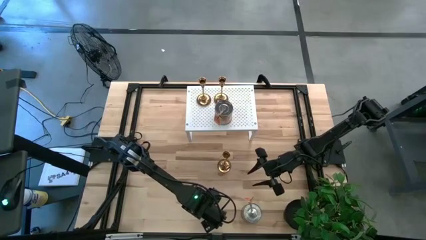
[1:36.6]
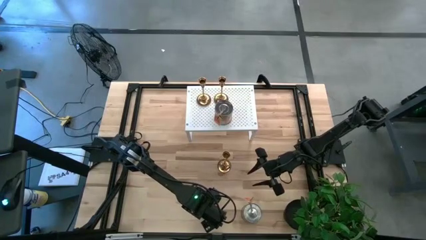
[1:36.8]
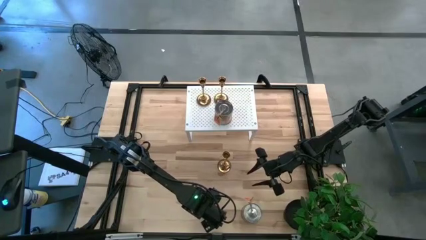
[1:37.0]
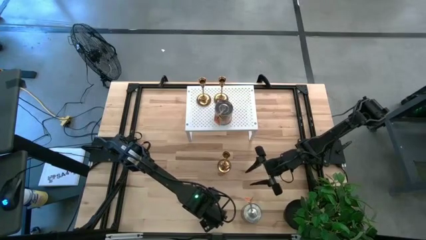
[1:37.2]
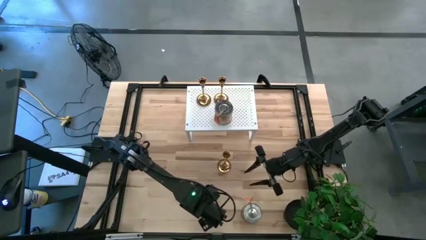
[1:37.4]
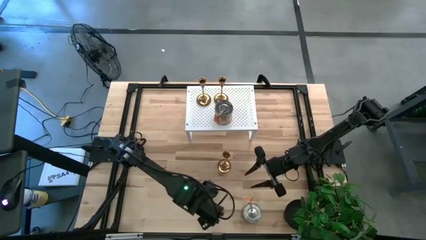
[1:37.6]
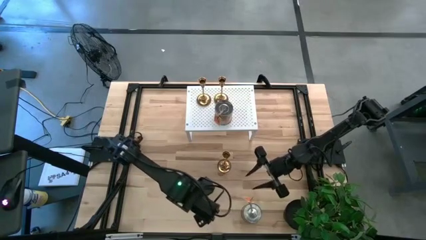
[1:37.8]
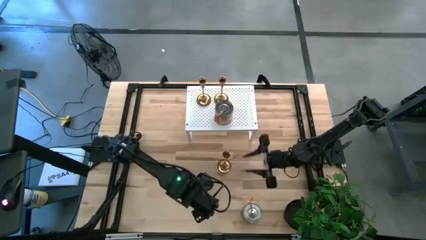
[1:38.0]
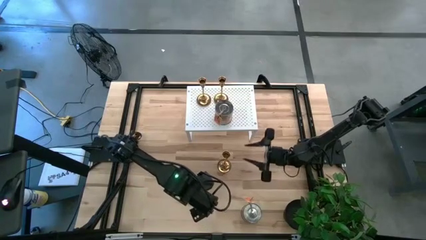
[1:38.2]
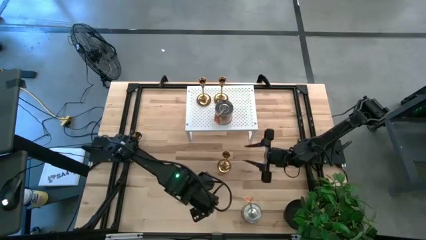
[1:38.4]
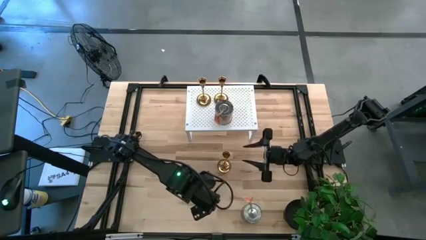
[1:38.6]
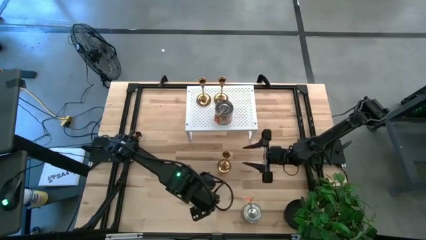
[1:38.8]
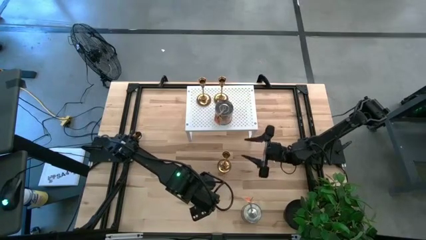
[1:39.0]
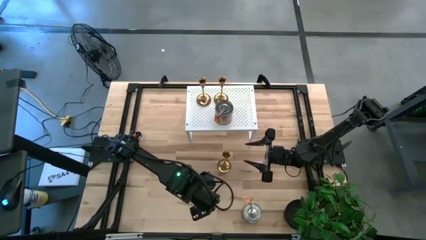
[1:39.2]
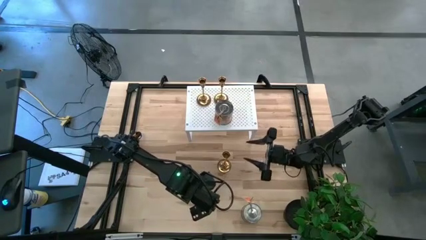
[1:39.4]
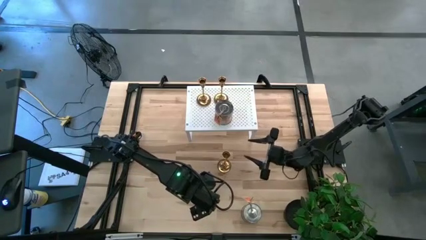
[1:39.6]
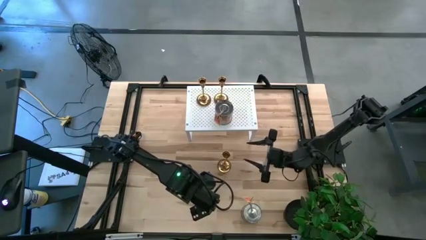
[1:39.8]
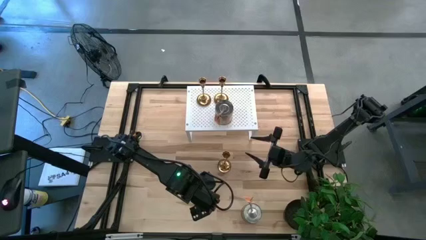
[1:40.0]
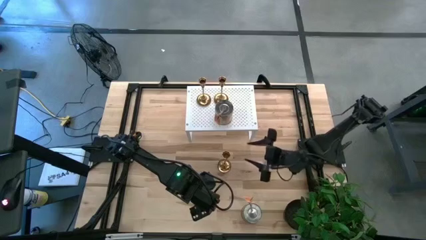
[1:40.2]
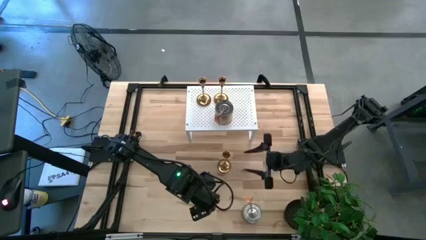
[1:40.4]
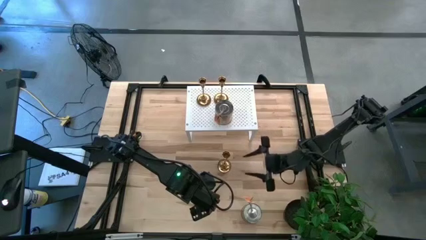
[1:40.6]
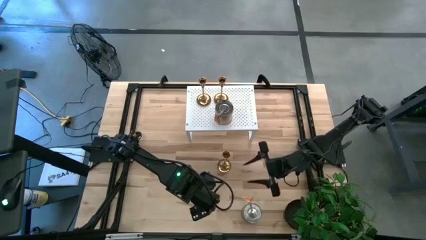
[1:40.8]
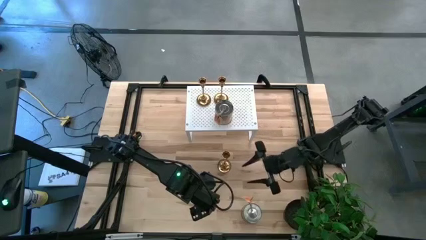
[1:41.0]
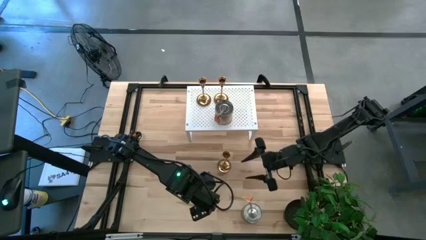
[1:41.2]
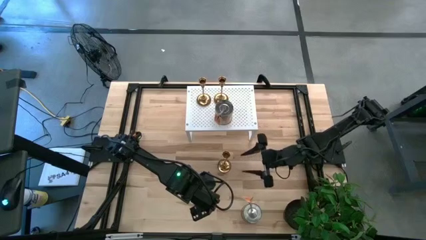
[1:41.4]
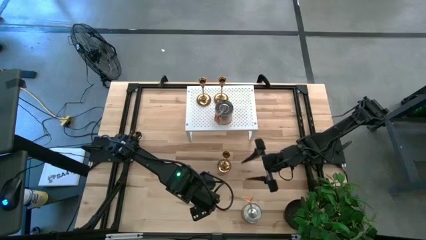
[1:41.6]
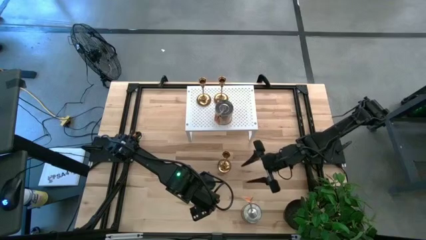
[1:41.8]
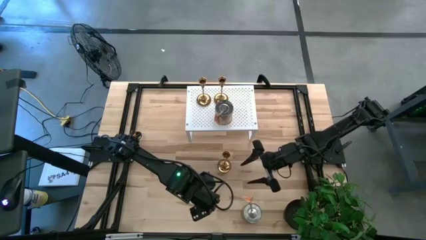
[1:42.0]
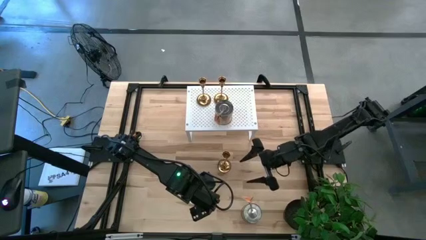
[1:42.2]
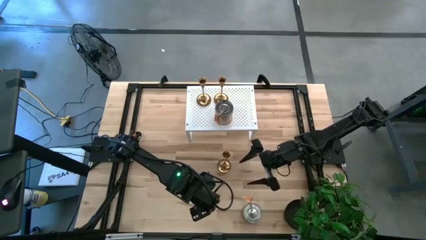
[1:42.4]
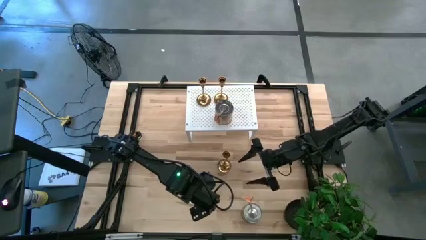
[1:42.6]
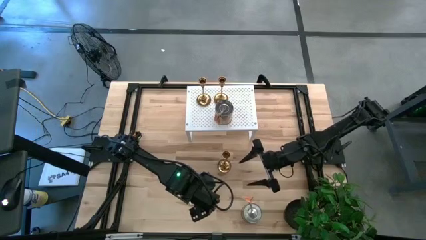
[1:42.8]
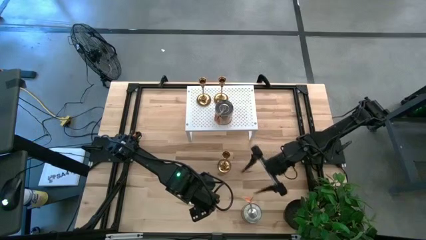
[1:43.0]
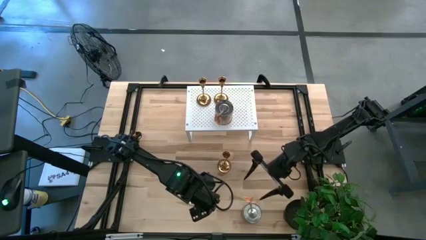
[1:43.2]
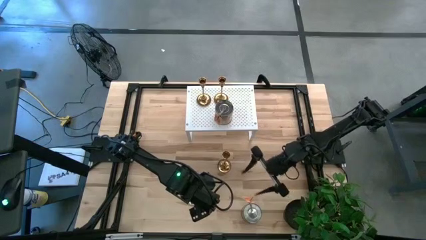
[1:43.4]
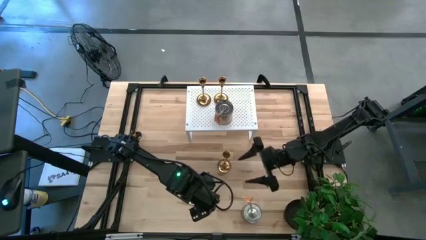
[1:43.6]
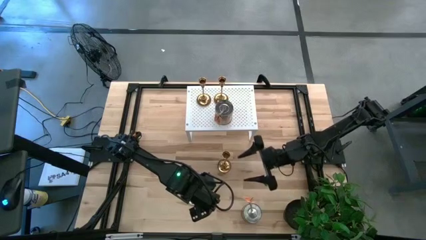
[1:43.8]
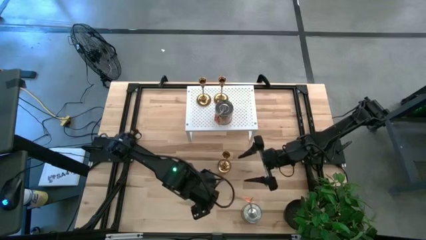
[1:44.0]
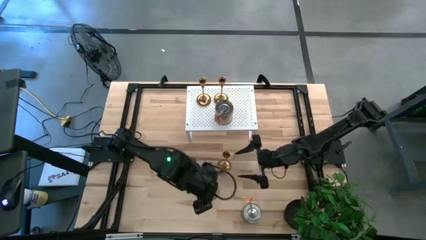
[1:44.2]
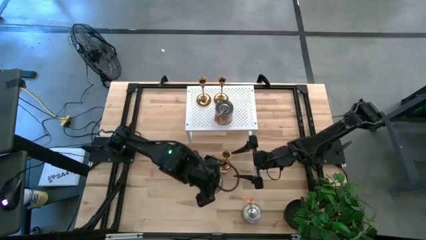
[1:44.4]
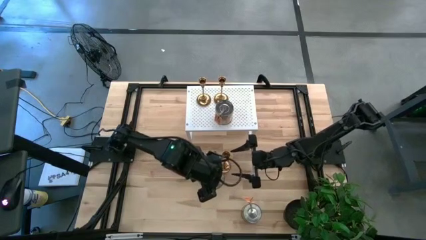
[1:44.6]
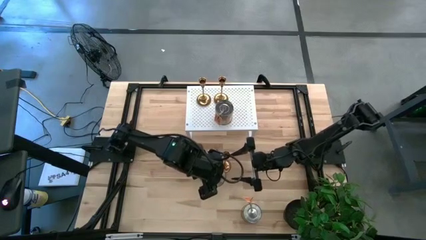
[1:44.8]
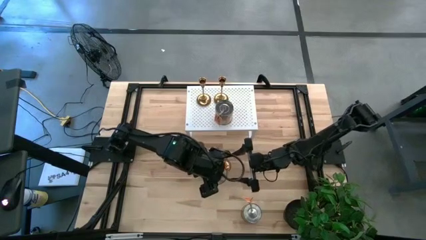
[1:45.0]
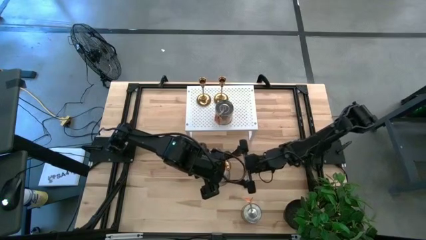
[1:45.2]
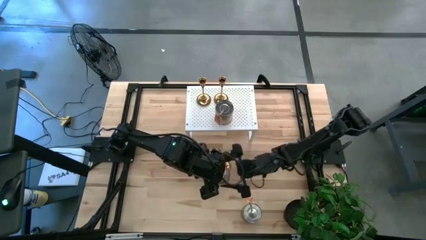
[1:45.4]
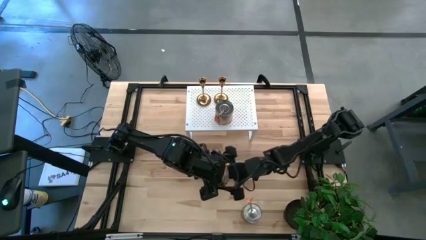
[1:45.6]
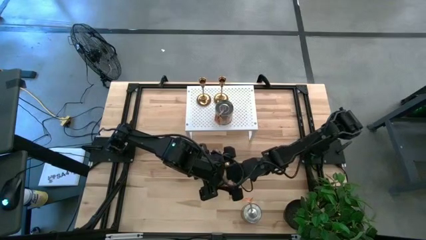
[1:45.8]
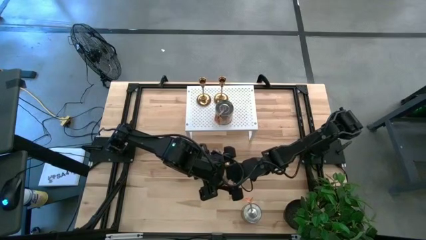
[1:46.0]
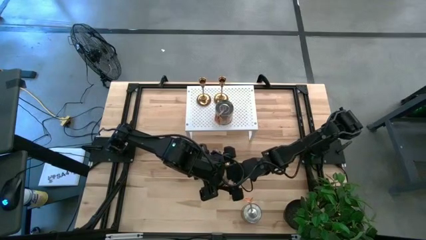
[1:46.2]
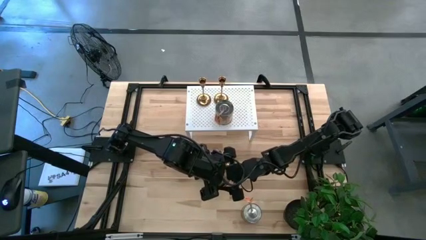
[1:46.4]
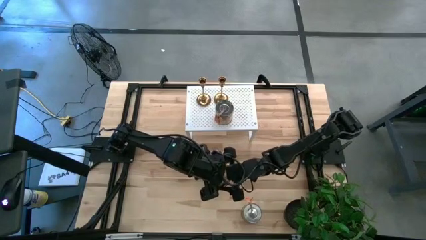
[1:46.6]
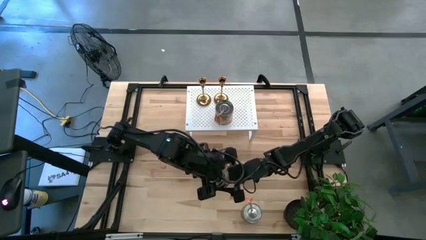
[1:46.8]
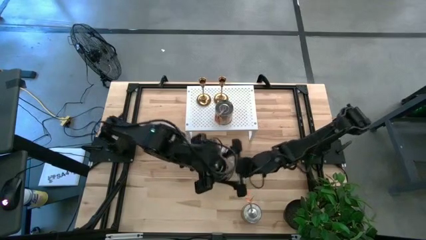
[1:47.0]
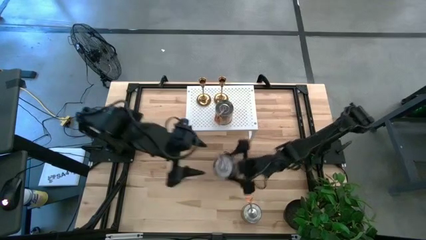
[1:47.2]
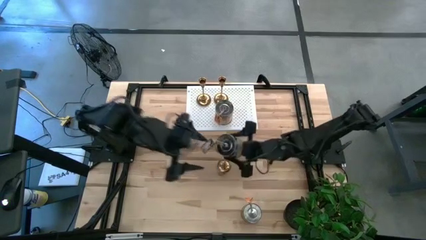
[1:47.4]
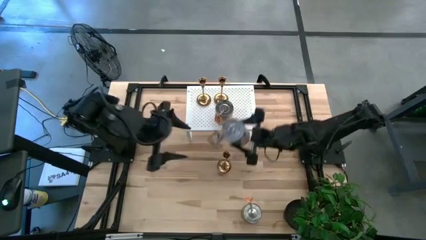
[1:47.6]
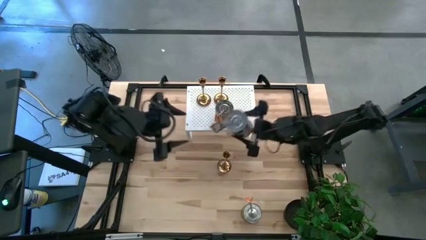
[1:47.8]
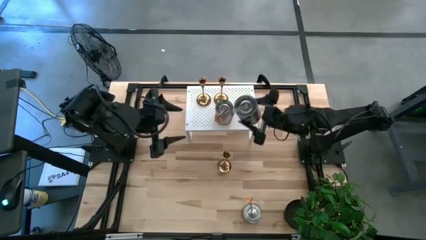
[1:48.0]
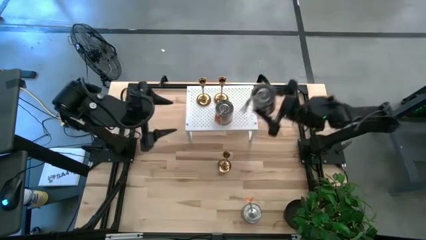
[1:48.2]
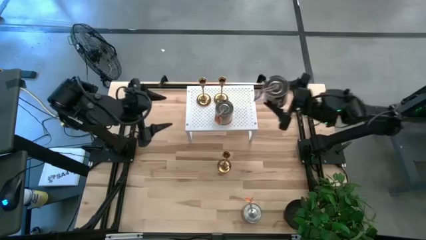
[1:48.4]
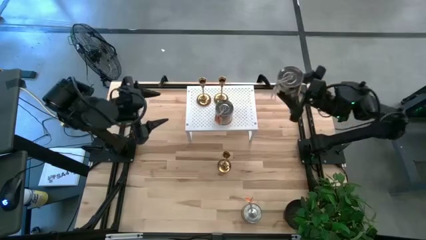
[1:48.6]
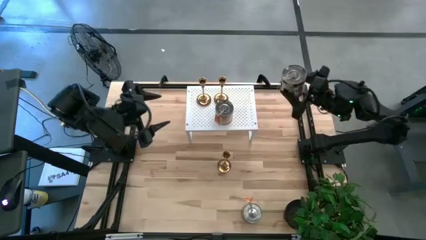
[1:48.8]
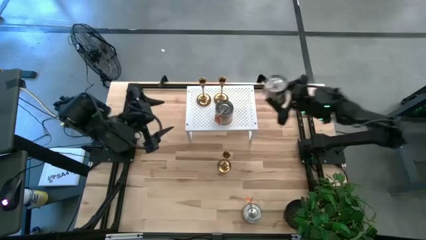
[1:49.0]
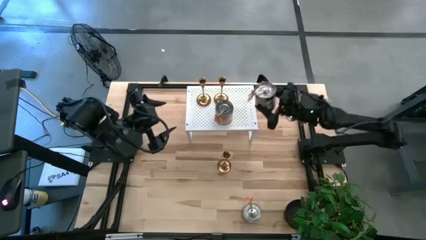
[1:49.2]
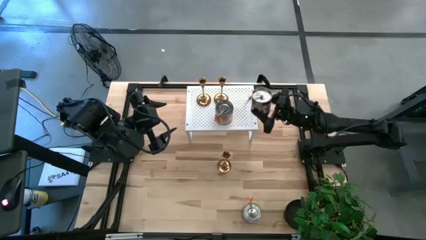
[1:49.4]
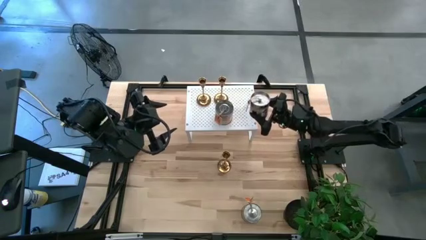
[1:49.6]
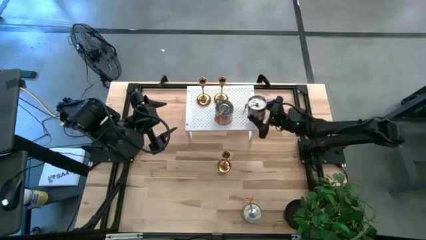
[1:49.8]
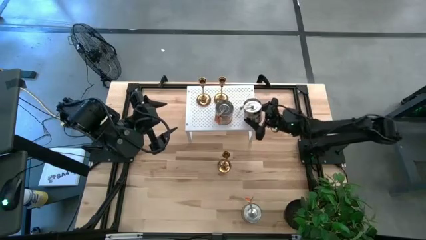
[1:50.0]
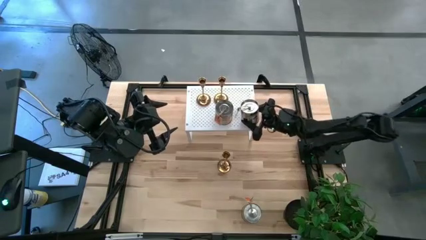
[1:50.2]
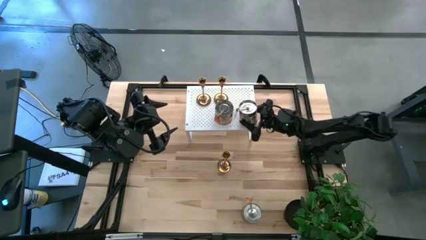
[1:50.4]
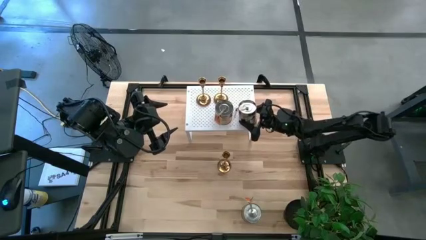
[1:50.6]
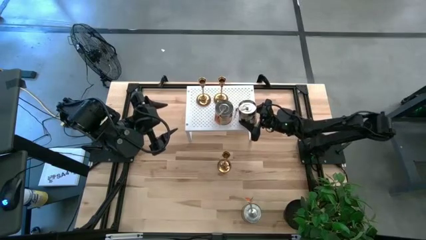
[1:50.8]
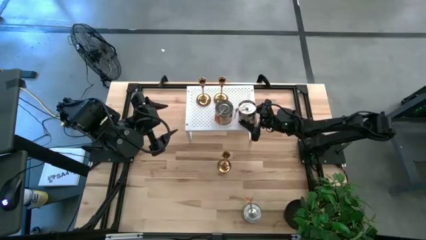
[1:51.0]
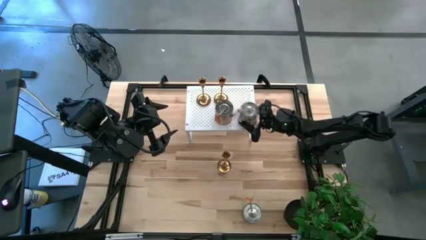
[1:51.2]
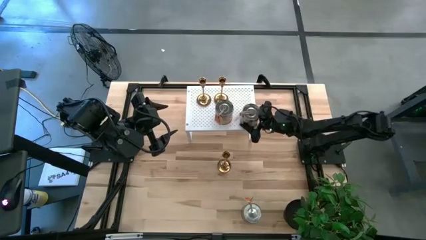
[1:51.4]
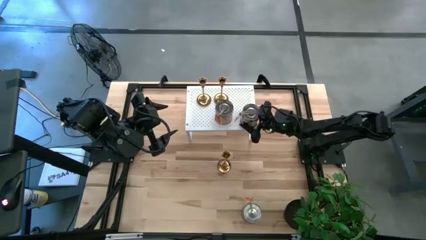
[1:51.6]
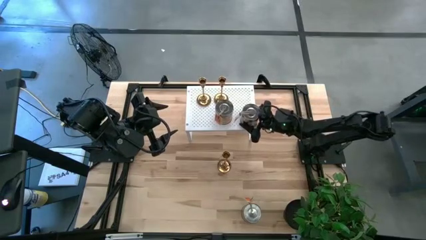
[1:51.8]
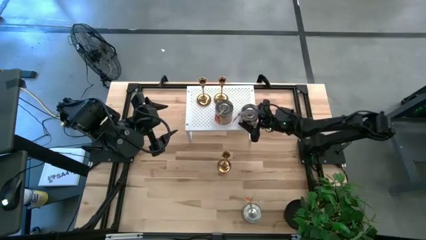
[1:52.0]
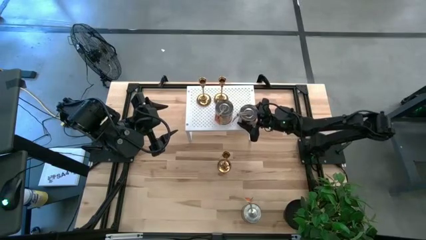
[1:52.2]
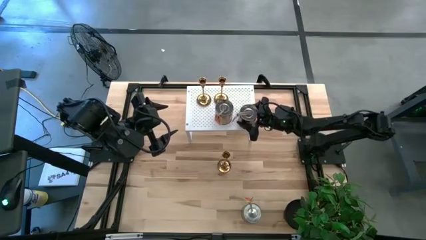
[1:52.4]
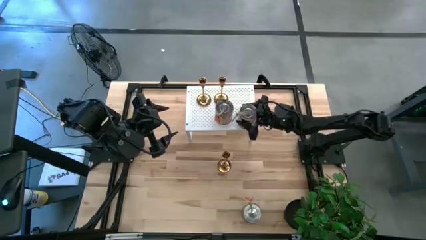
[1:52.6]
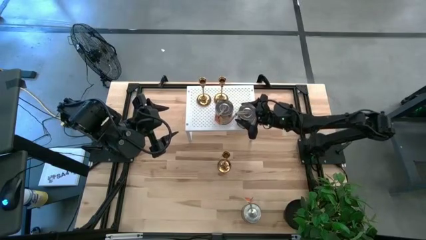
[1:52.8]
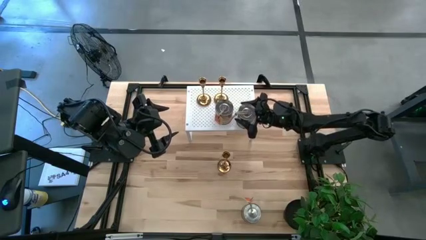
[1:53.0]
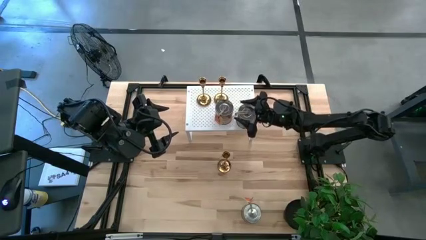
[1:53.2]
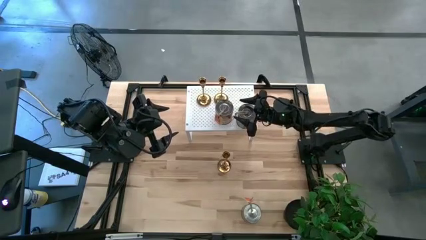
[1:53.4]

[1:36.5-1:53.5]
Task: Pick & Place candle stick holders
Put the left silver scented candle on the shelf aligned with the other silver scented candle
